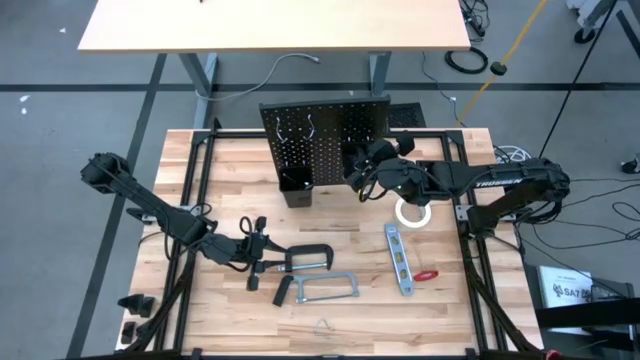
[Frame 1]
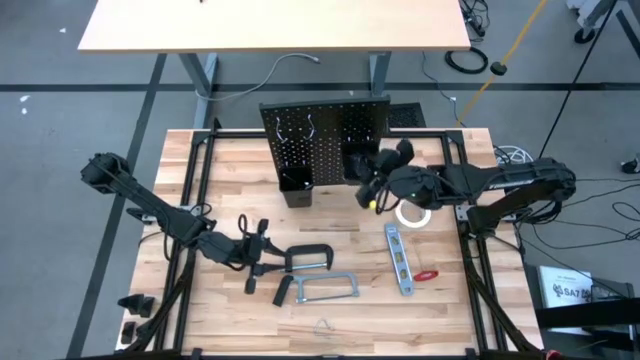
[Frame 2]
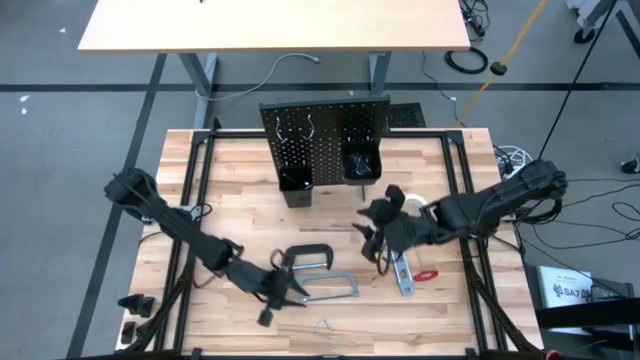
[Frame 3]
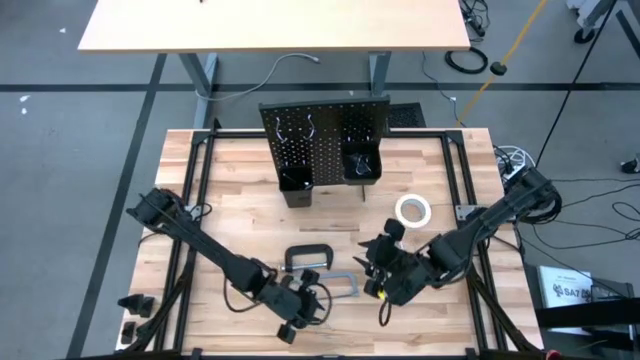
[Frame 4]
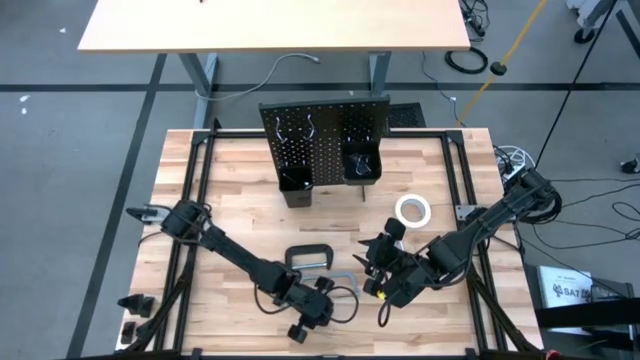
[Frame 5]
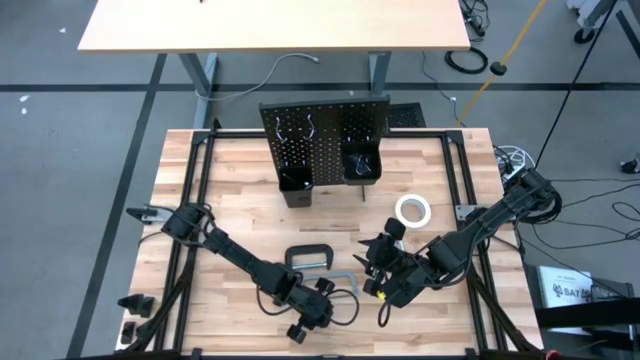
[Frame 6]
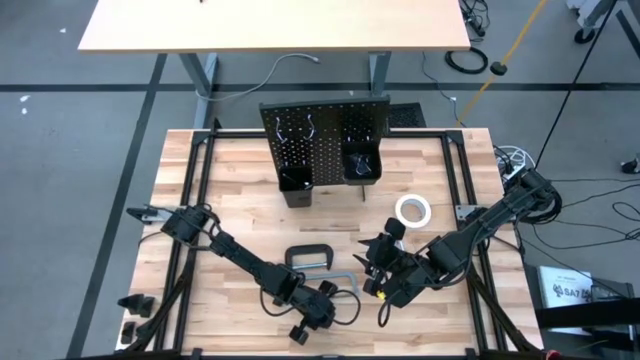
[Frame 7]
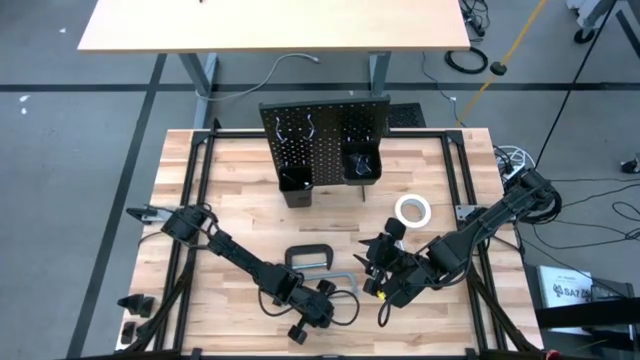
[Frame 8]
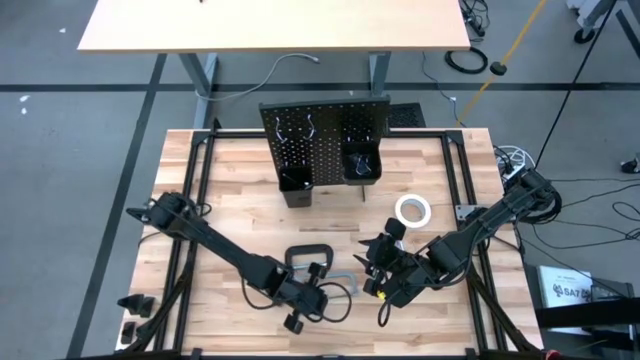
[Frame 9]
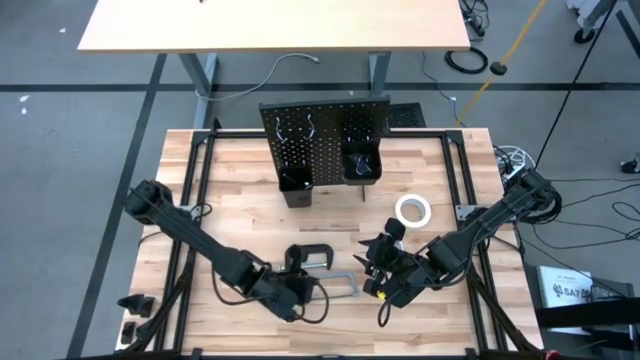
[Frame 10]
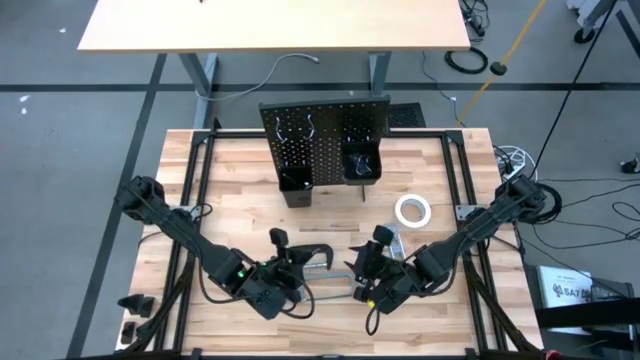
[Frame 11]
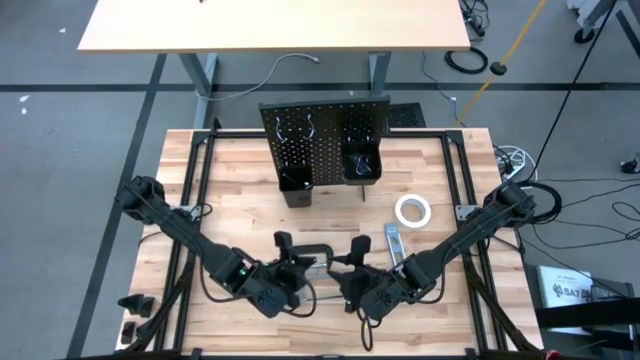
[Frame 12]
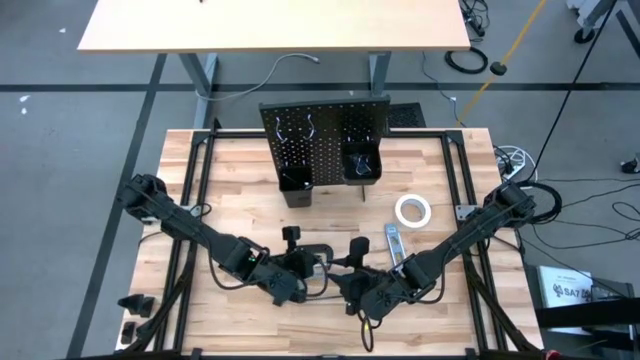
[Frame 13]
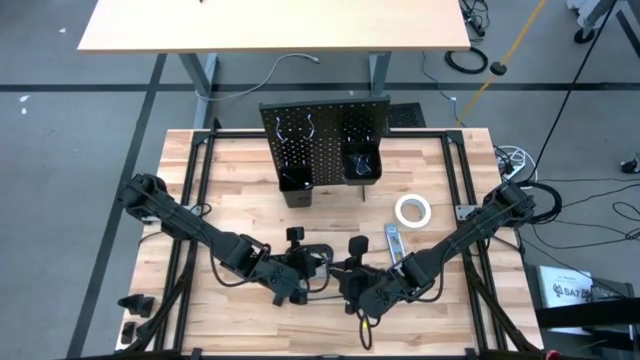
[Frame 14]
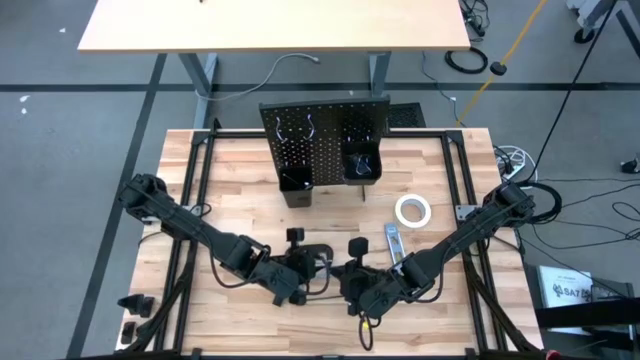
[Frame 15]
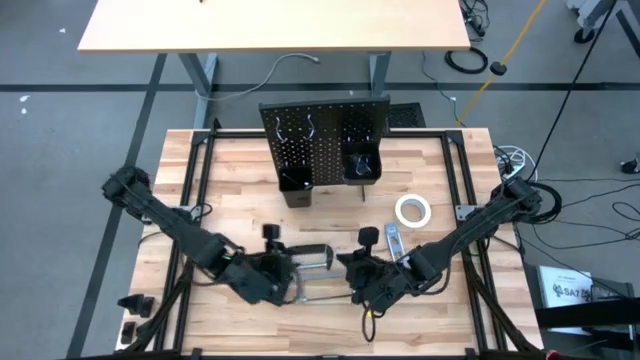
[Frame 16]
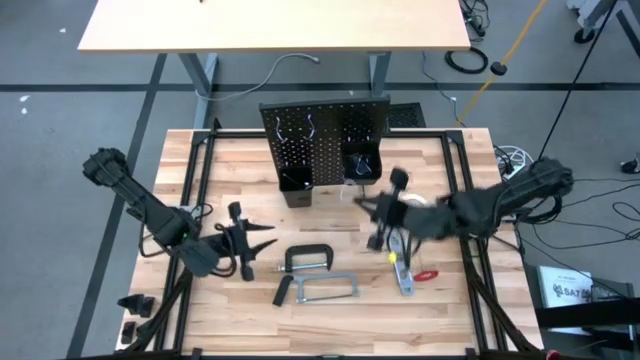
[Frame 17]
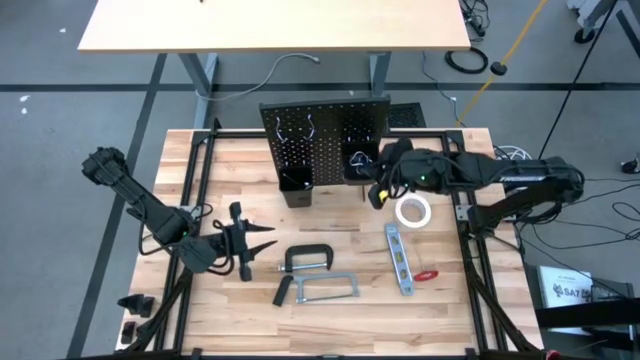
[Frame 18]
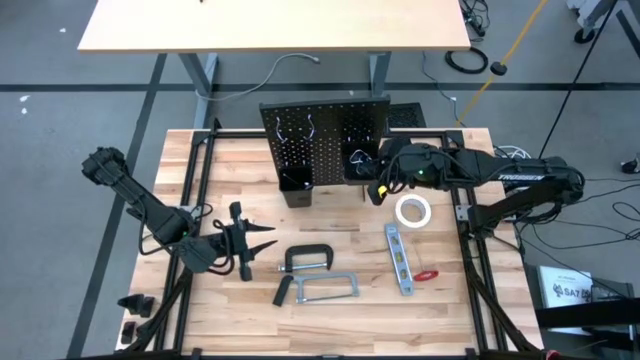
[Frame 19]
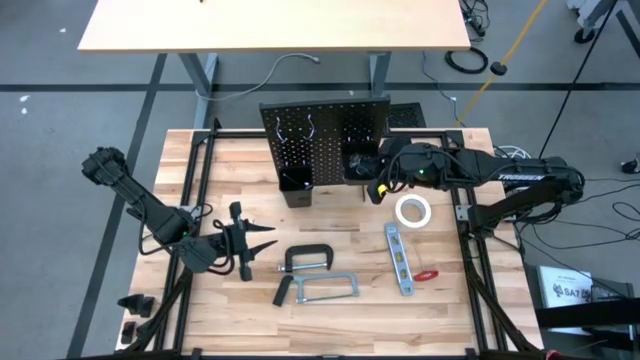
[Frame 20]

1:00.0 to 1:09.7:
Task: Hang tools onto peg board
Put the binder clip into the top black bin on the peg board

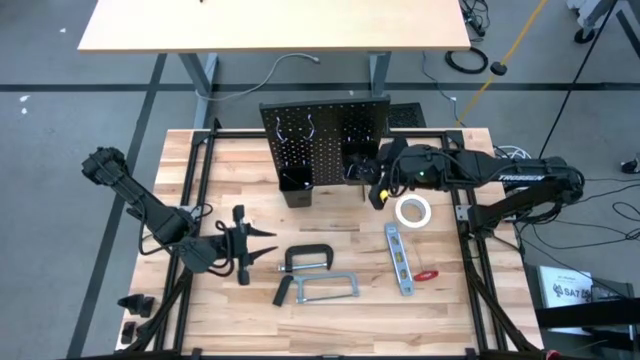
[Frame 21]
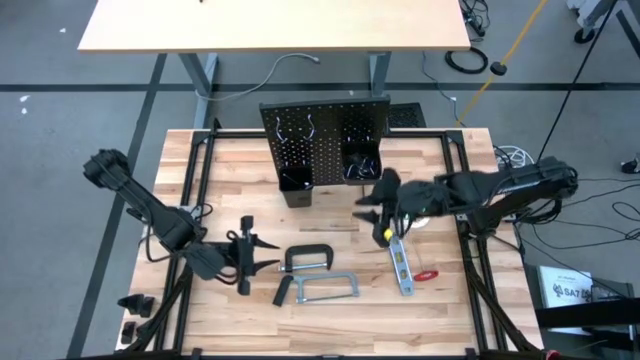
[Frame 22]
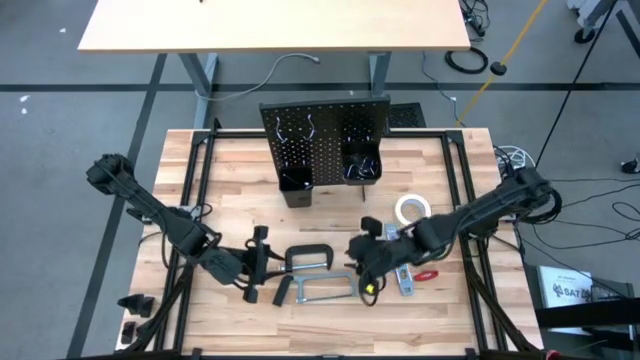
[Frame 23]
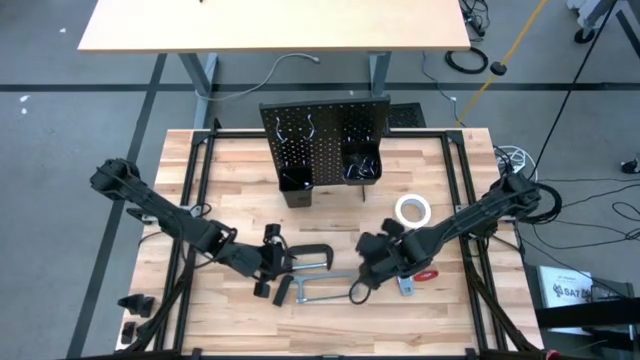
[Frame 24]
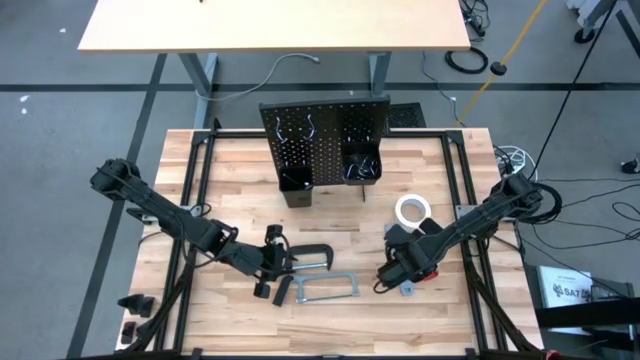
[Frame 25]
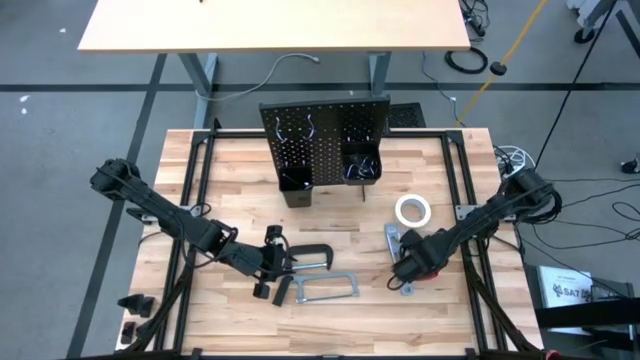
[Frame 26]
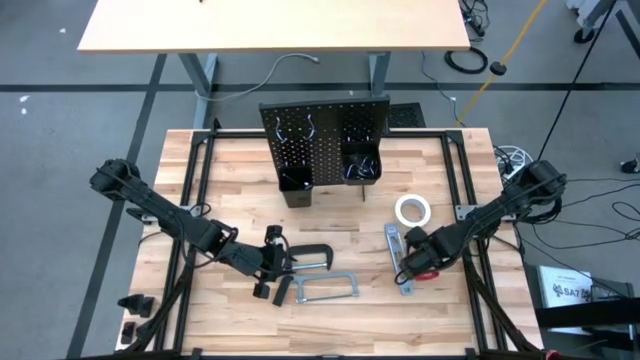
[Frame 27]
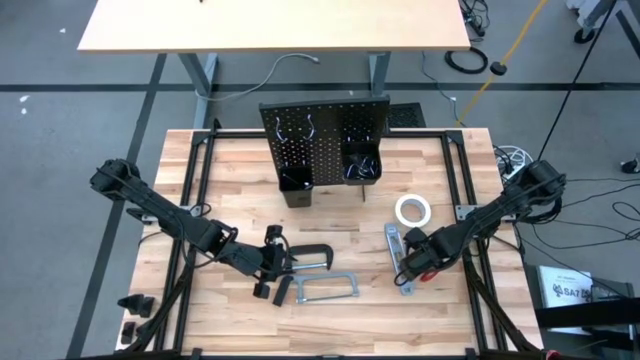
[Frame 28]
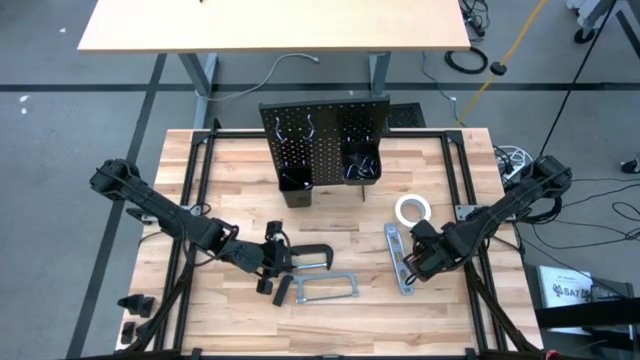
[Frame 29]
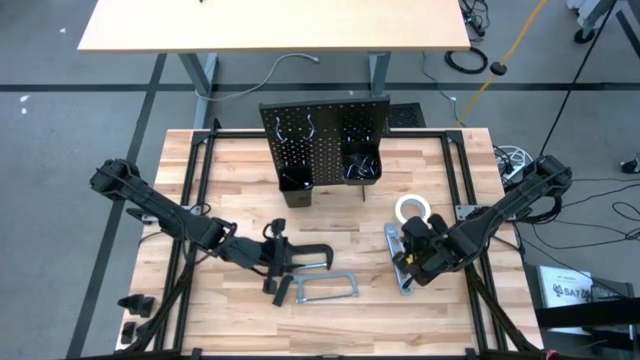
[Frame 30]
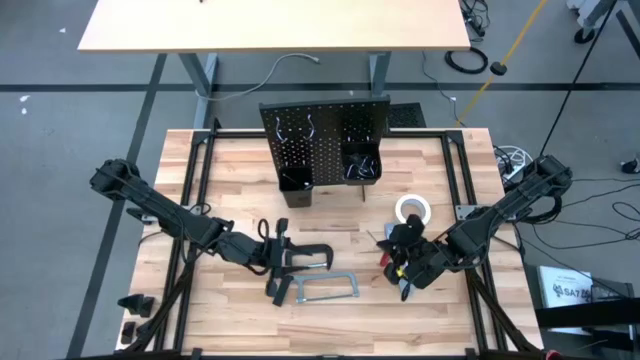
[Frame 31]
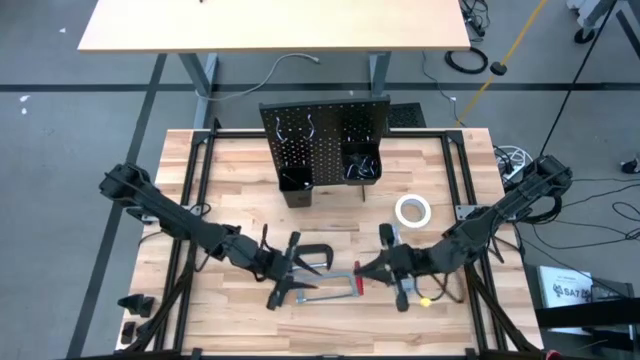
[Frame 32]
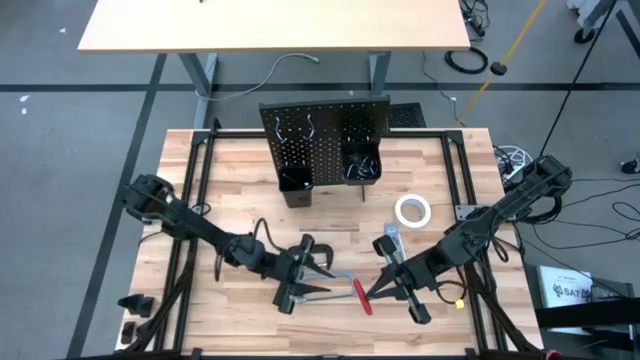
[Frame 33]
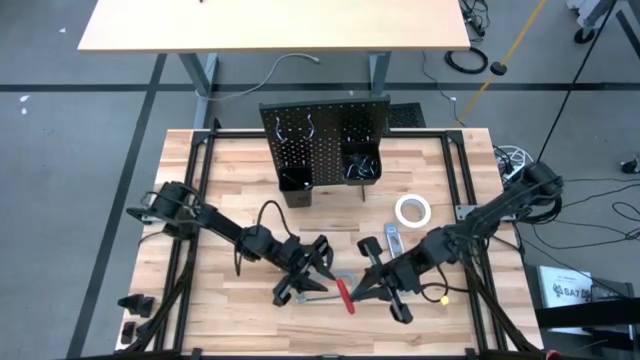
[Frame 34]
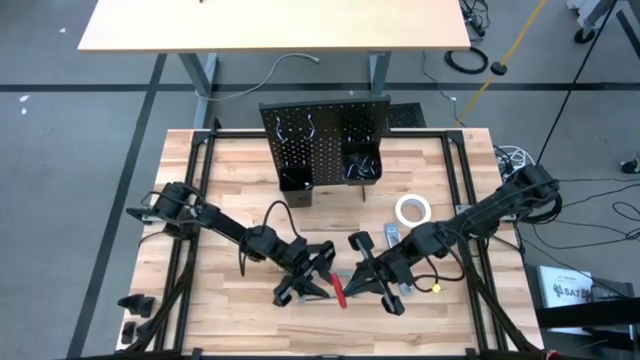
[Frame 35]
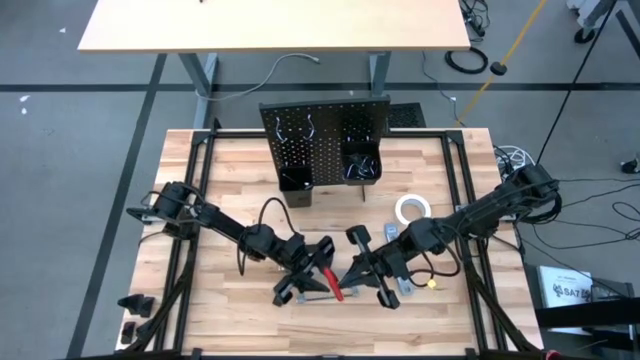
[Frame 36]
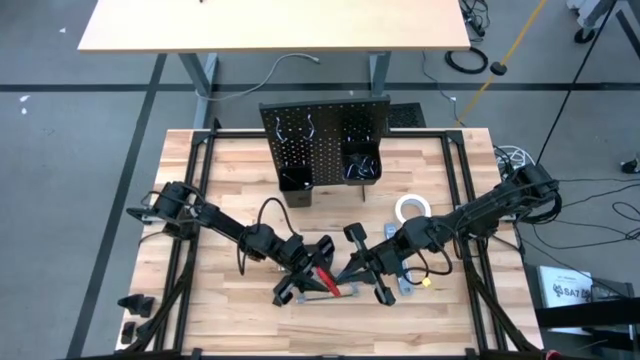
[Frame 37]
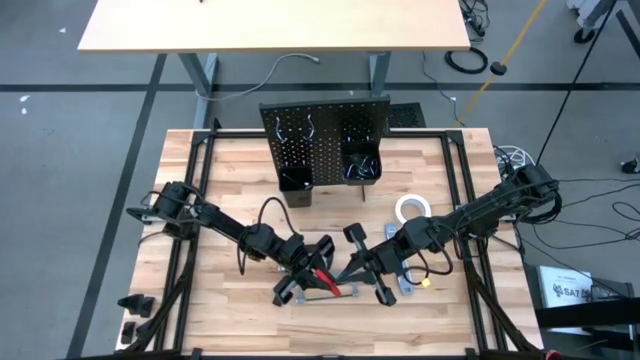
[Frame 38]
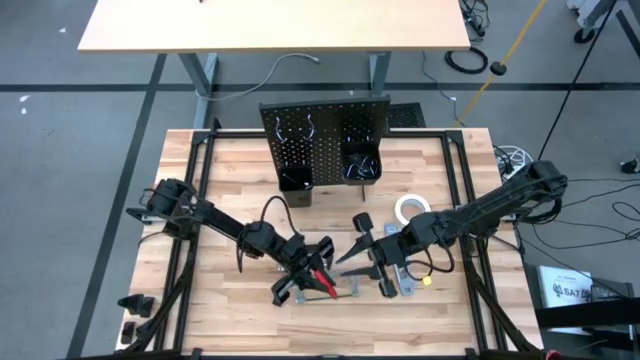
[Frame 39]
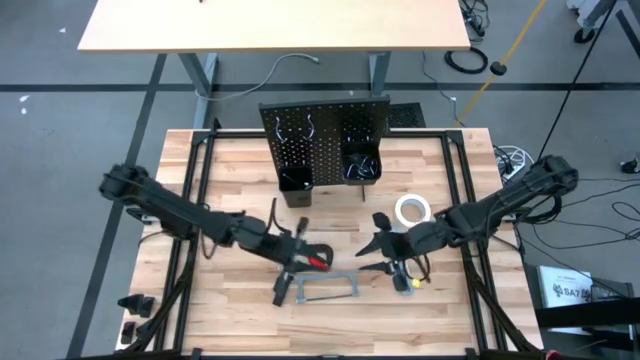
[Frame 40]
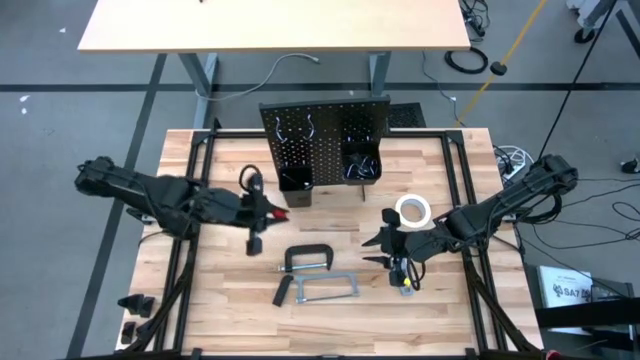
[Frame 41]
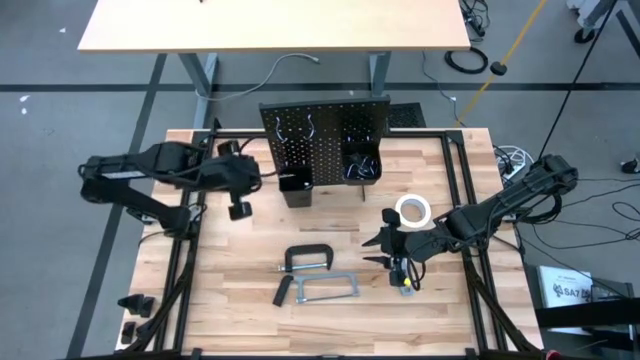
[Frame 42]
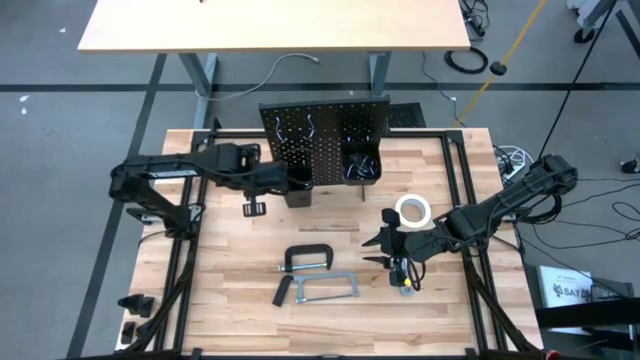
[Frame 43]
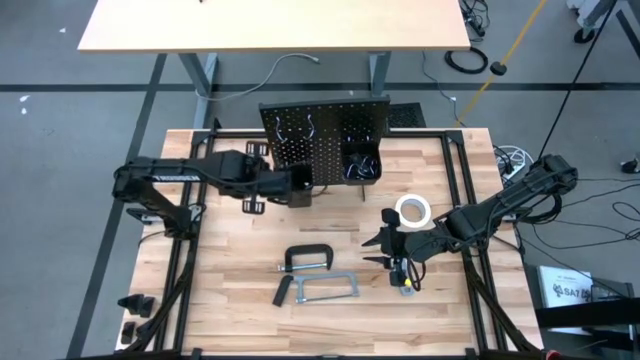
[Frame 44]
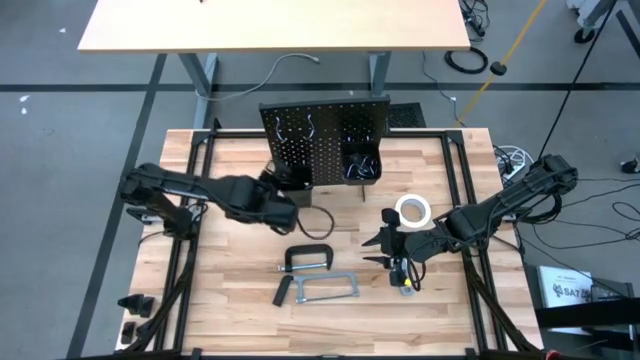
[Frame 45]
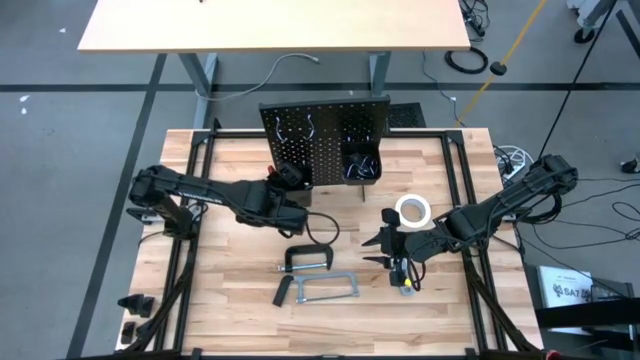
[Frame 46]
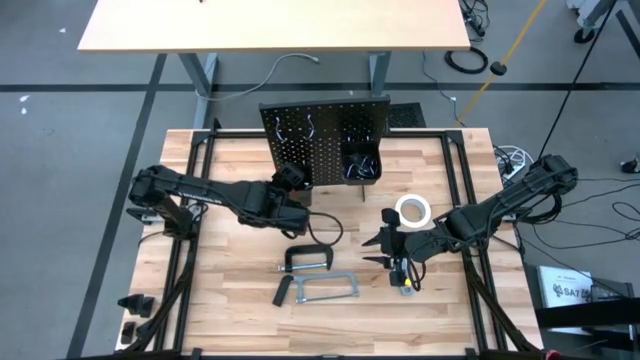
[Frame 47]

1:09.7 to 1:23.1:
Put the red allen wrench into the left black bin on the peg board
